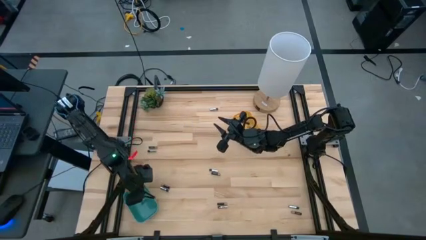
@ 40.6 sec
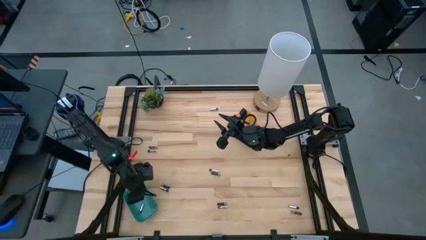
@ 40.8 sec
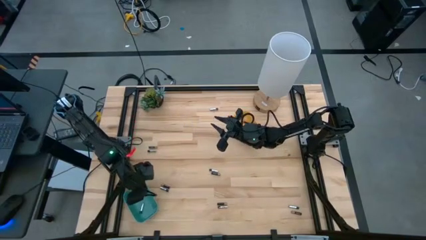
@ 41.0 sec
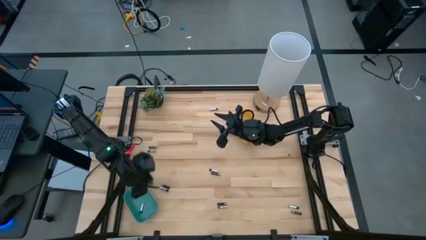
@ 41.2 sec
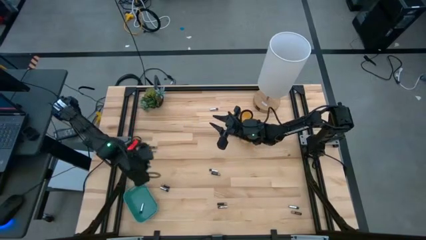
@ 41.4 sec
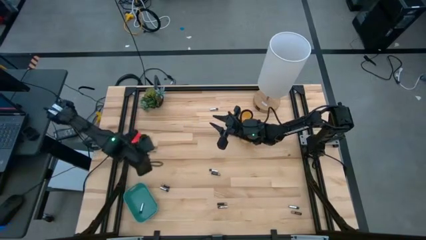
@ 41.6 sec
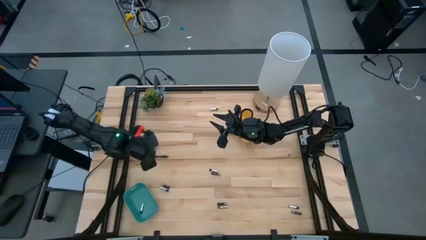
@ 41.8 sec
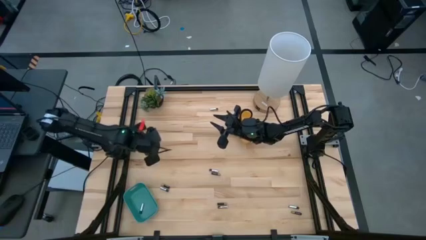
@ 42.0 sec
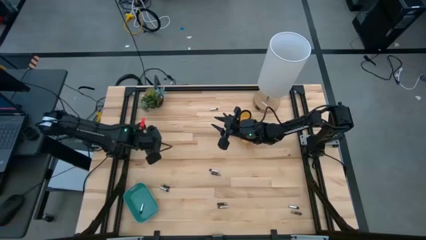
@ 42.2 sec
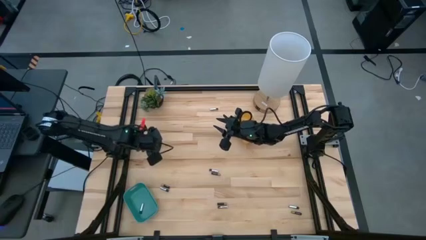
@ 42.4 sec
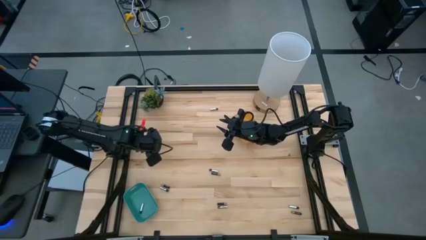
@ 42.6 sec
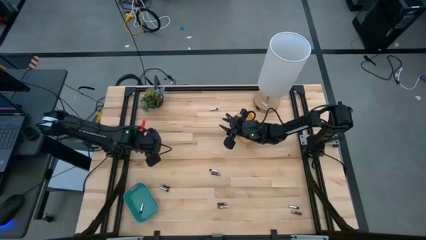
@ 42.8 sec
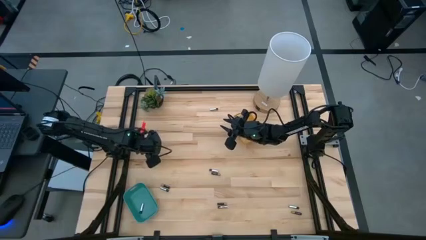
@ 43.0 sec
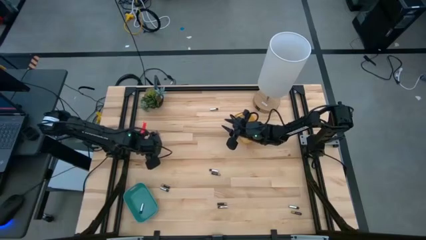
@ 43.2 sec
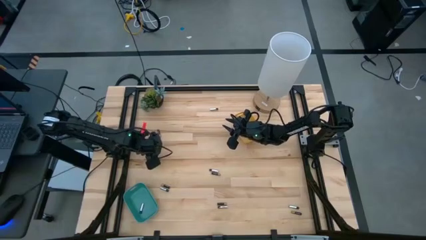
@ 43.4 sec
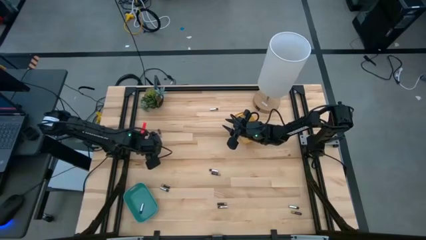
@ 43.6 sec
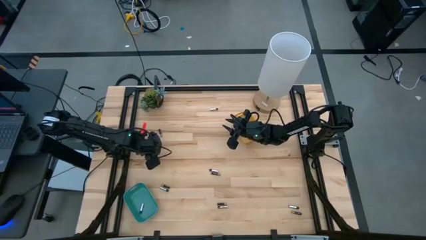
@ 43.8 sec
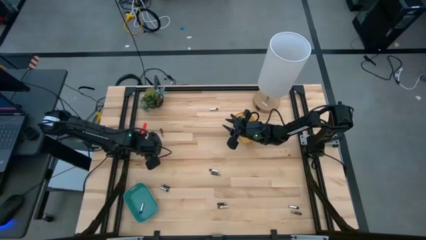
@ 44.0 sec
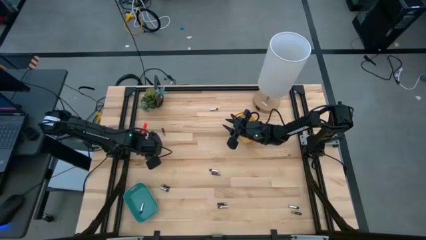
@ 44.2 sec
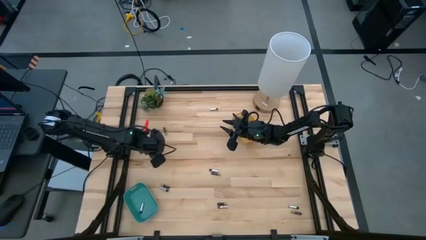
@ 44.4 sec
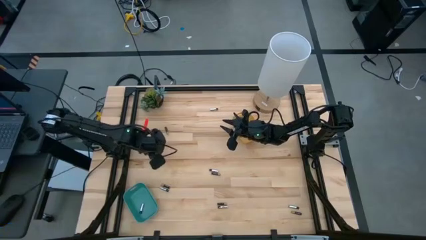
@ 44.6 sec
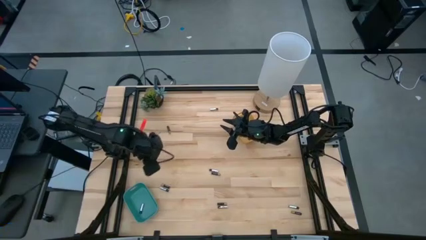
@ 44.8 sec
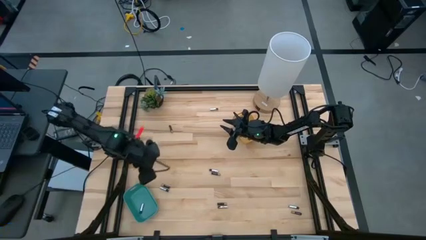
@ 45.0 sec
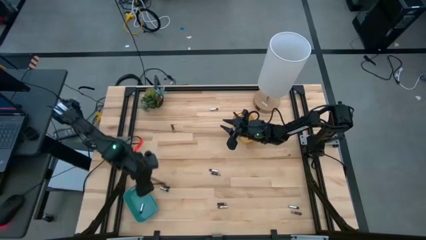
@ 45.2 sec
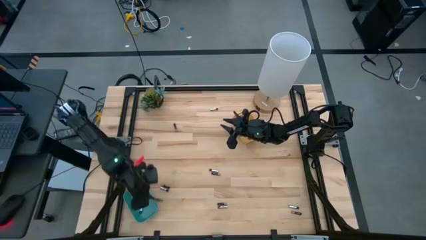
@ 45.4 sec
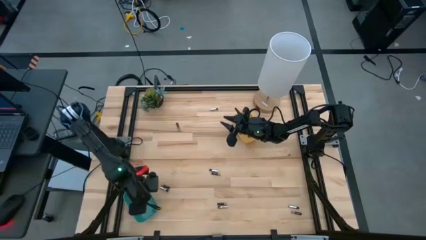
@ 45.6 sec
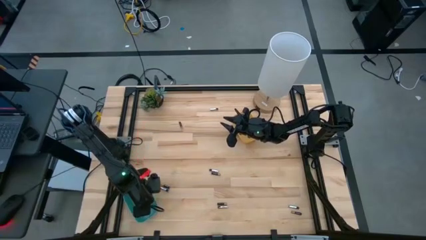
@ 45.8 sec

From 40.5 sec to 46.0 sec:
Task: Sort batteries
Put the silver battery into the blue bin

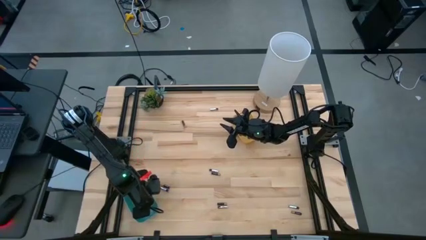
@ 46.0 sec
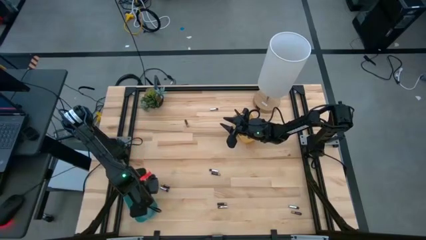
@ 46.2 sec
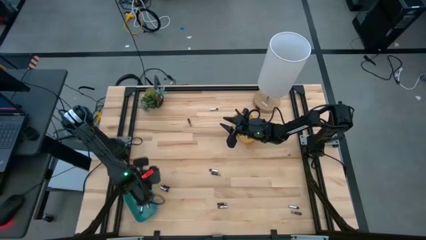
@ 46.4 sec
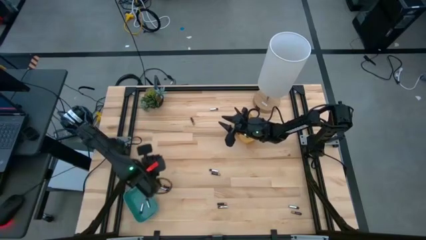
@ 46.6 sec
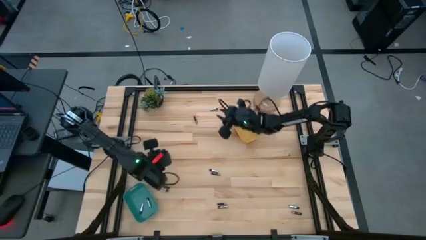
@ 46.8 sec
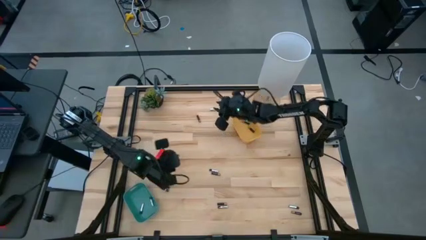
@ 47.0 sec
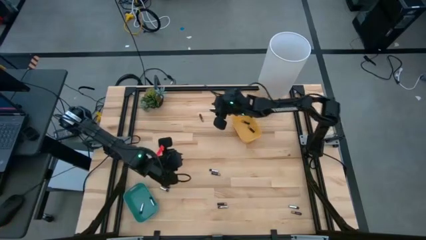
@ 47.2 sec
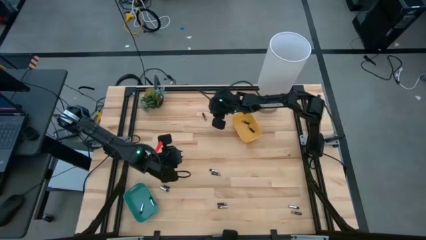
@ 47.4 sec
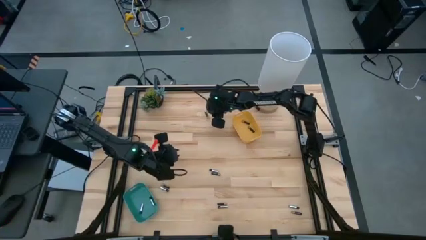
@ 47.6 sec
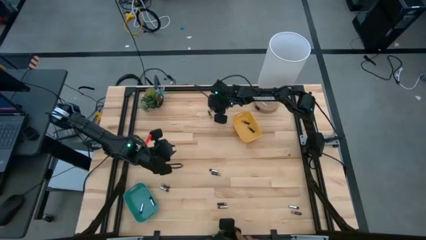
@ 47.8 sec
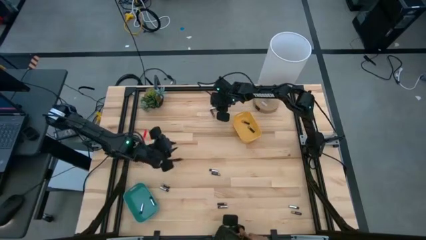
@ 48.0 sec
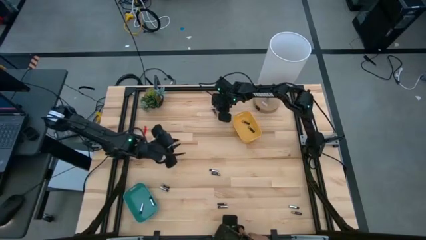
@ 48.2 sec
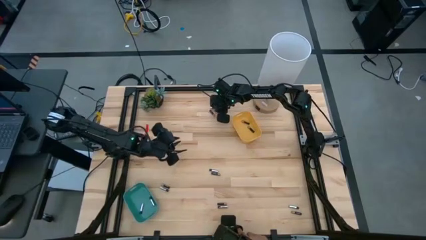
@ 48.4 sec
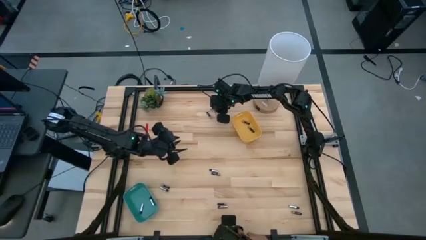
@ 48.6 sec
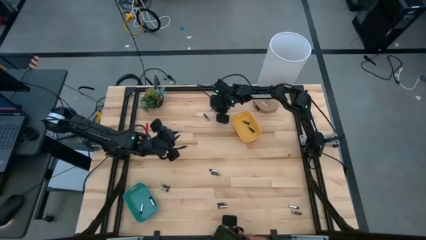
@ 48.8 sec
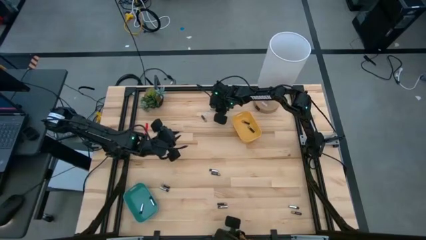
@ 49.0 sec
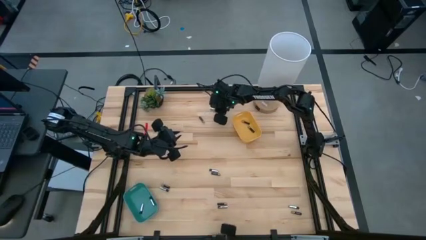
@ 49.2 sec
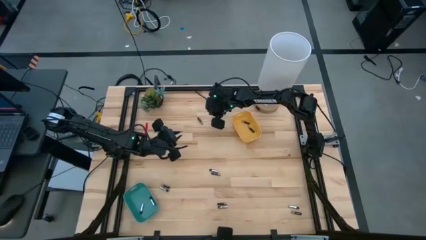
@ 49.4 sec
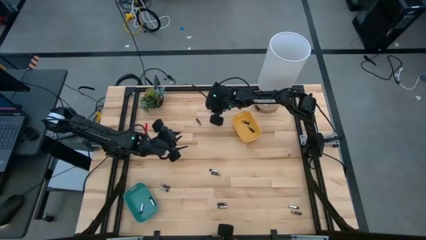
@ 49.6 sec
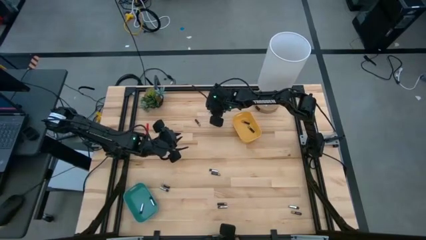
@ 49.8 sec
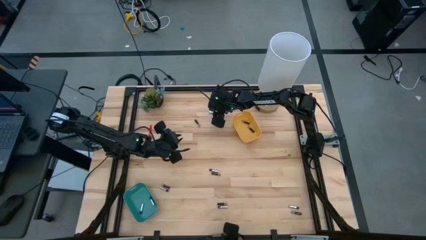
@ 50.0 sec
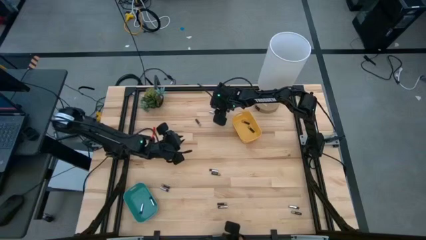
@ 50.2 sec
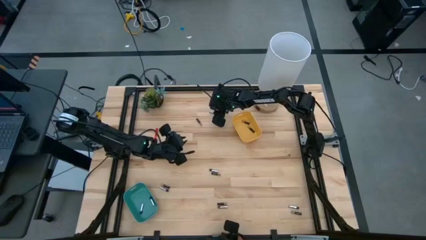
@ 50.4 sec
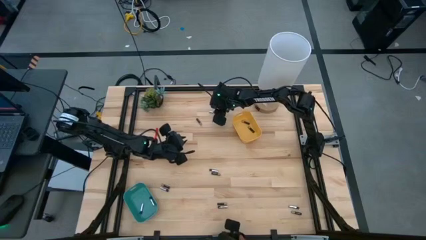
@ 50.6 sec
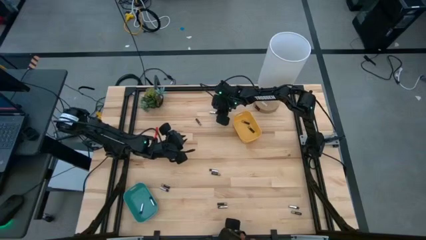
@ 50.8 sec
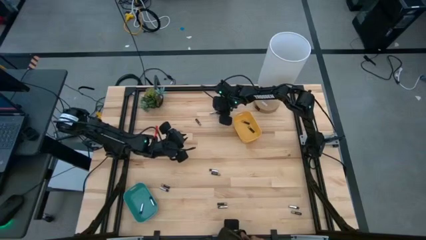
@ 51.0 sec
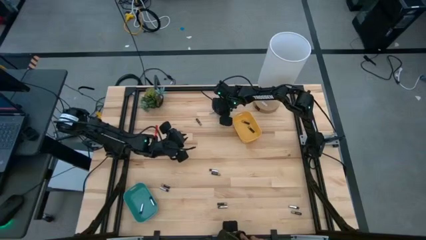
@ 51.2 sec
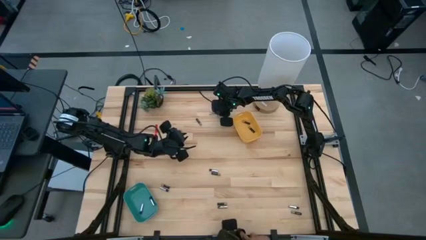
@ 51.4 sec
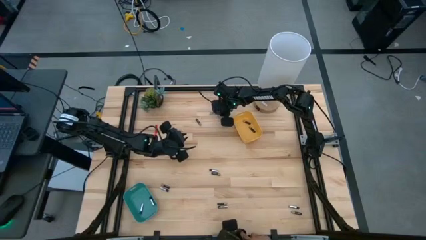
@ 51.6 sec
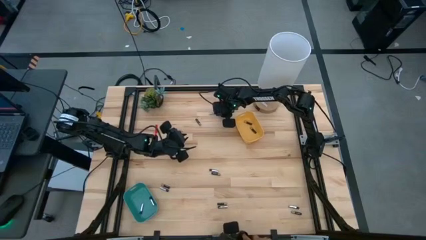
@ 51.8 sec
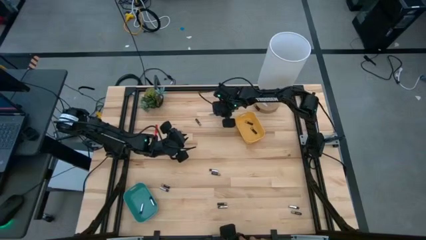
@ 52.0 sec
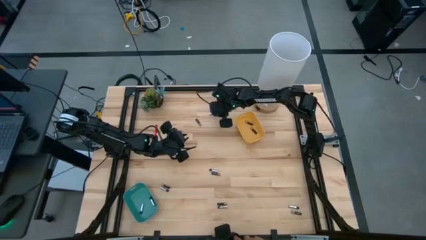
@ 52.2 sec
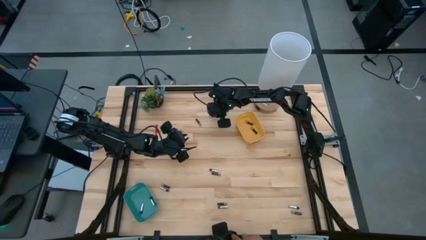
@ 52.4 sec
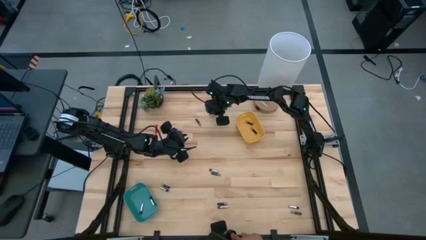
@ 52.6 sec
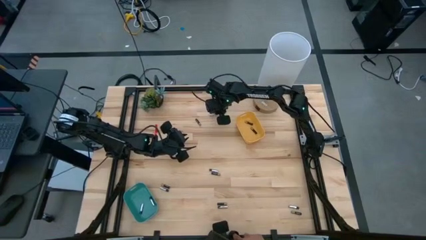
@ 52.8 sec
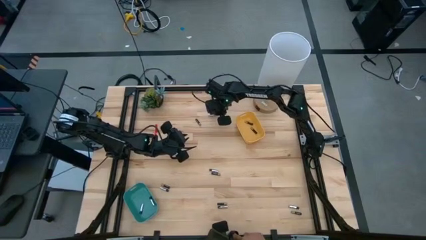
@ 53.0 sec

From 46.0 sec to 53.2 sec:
Put the silver battery into the yellow bin
